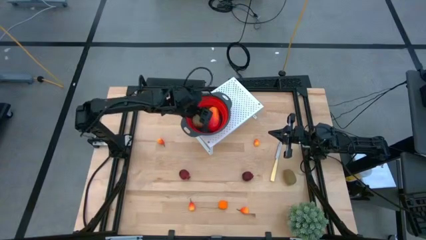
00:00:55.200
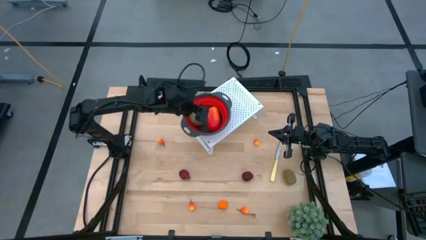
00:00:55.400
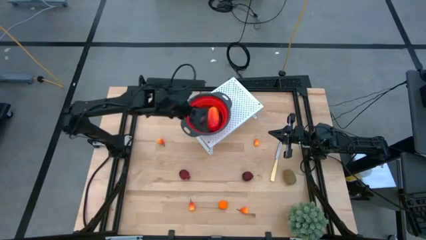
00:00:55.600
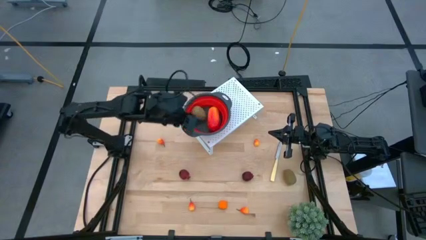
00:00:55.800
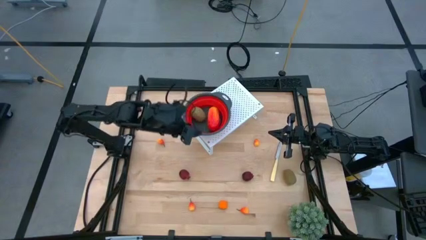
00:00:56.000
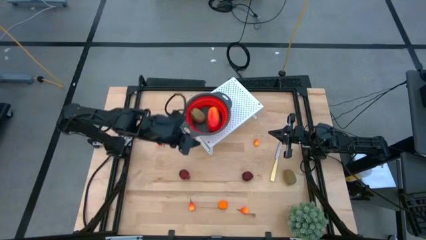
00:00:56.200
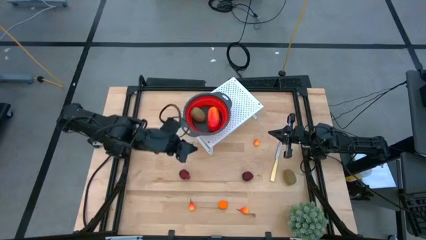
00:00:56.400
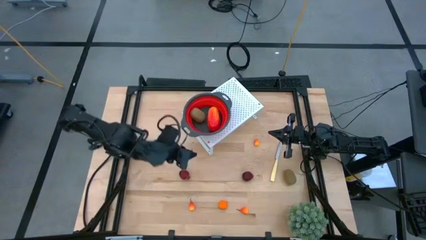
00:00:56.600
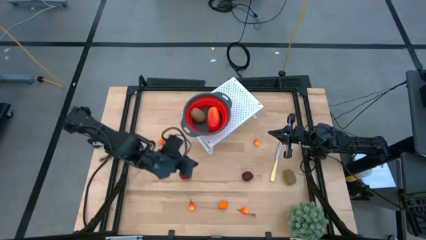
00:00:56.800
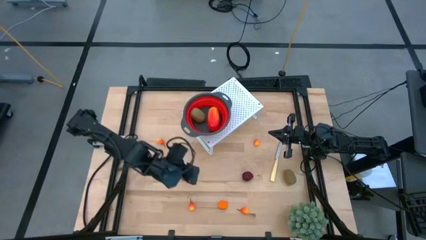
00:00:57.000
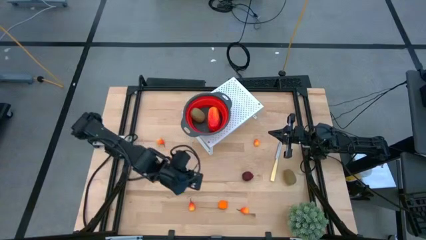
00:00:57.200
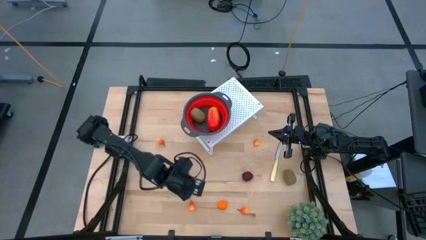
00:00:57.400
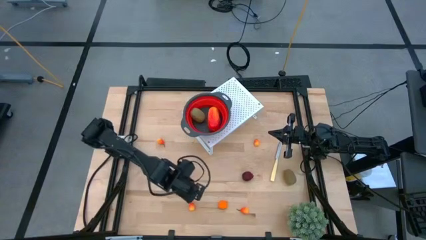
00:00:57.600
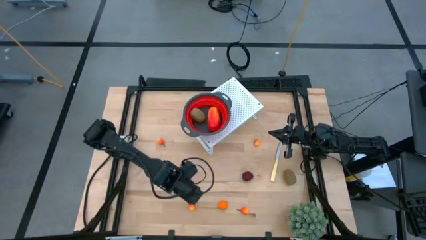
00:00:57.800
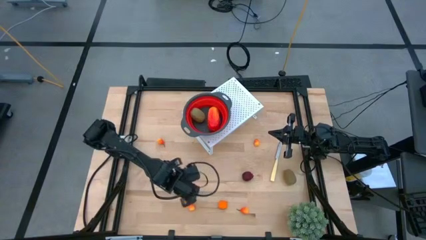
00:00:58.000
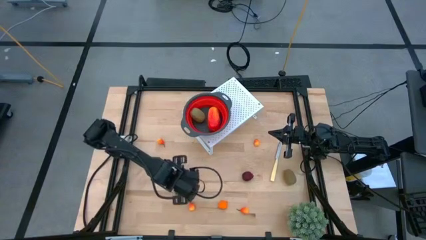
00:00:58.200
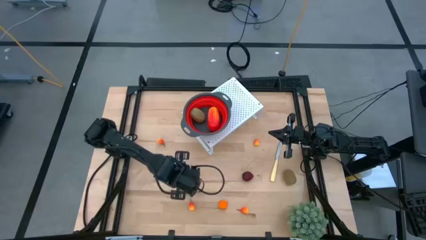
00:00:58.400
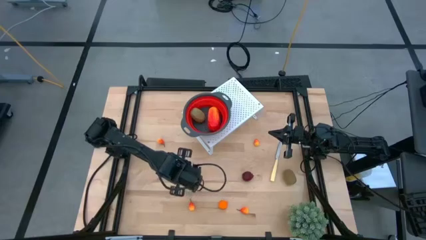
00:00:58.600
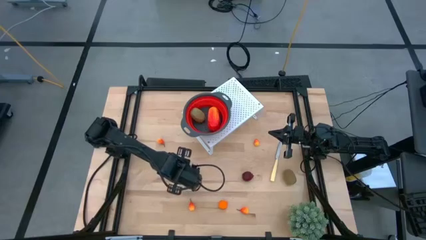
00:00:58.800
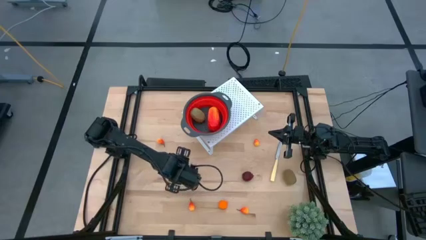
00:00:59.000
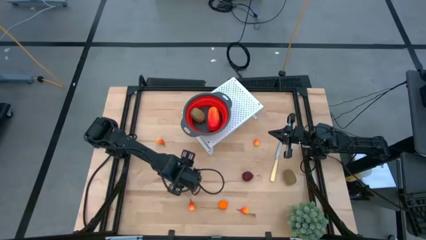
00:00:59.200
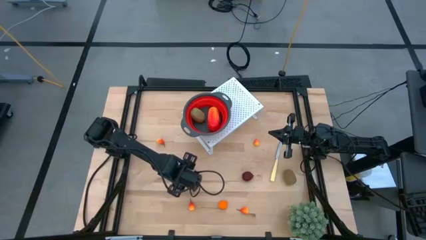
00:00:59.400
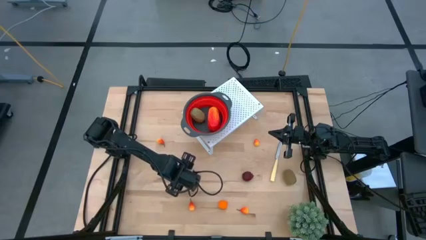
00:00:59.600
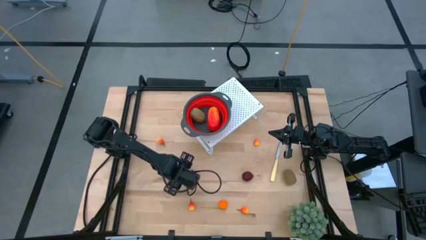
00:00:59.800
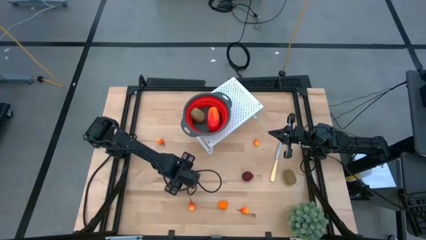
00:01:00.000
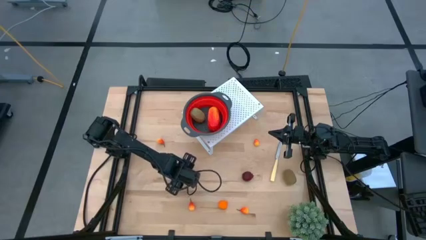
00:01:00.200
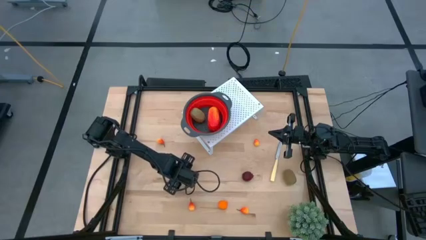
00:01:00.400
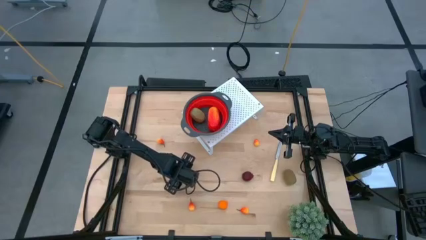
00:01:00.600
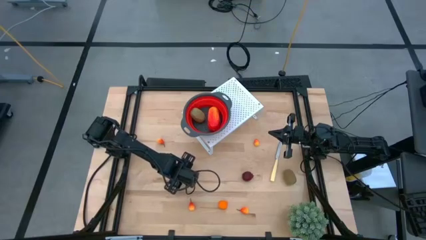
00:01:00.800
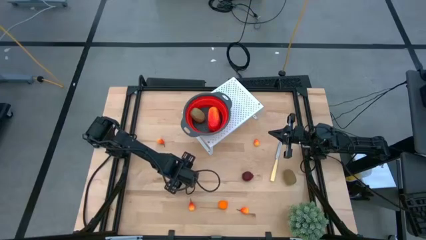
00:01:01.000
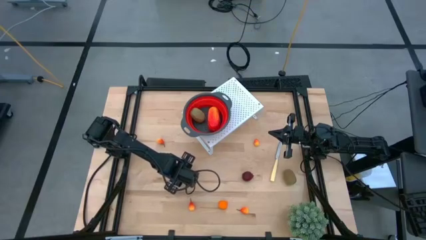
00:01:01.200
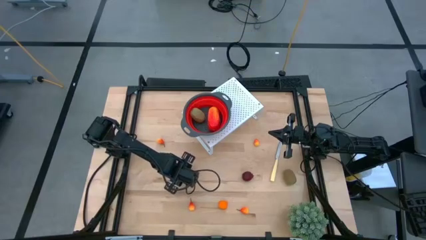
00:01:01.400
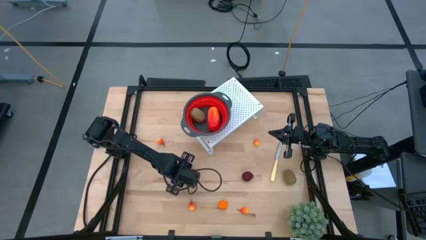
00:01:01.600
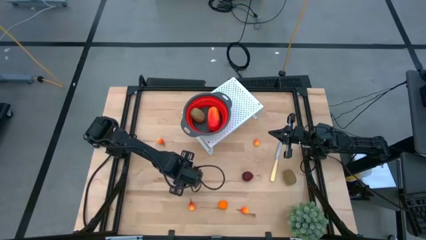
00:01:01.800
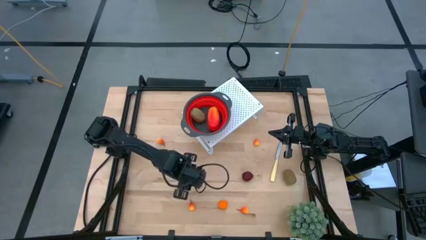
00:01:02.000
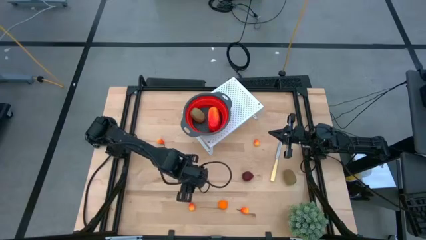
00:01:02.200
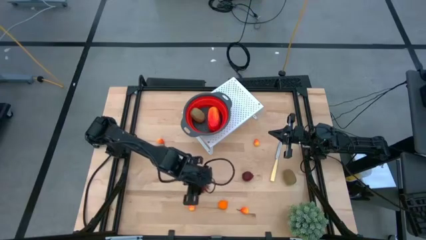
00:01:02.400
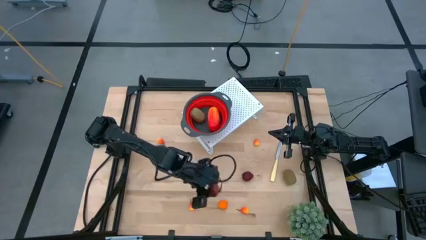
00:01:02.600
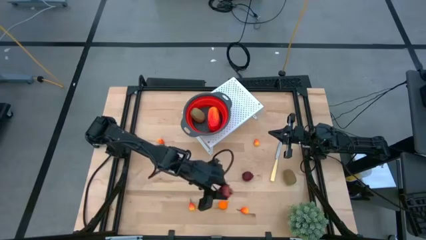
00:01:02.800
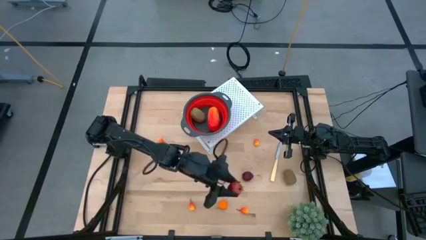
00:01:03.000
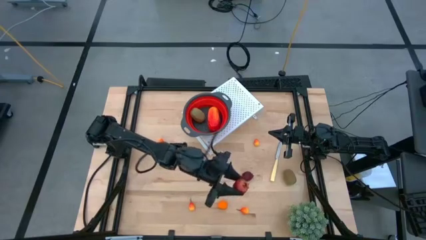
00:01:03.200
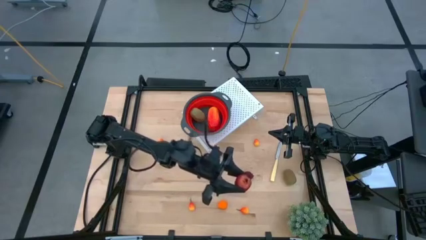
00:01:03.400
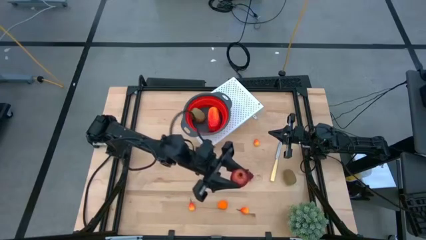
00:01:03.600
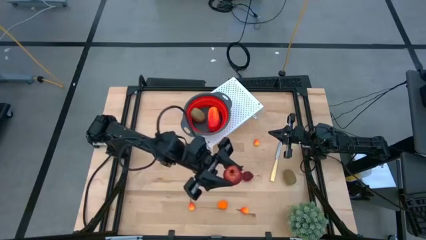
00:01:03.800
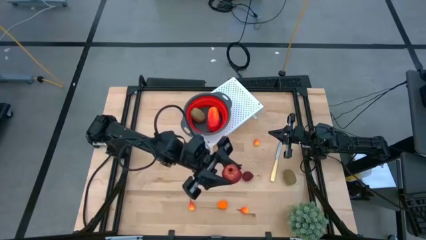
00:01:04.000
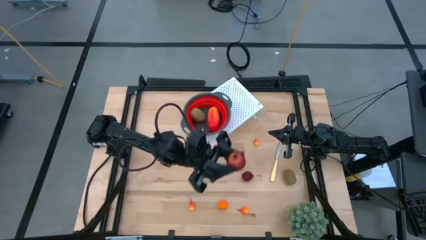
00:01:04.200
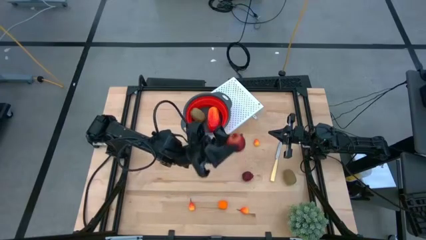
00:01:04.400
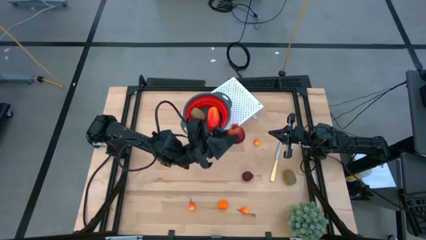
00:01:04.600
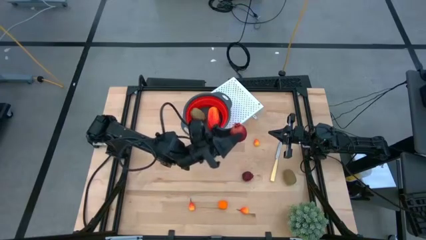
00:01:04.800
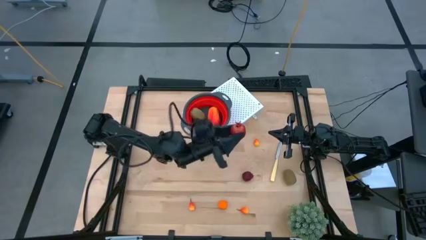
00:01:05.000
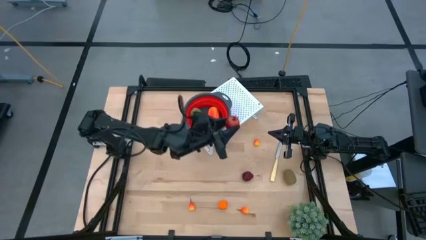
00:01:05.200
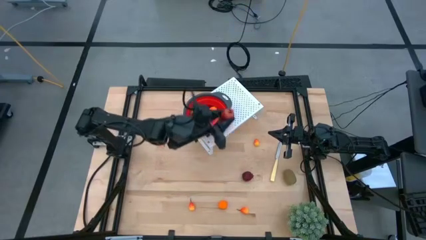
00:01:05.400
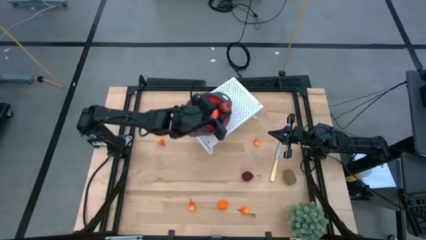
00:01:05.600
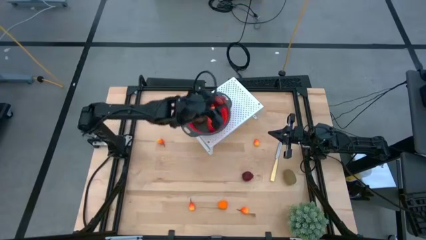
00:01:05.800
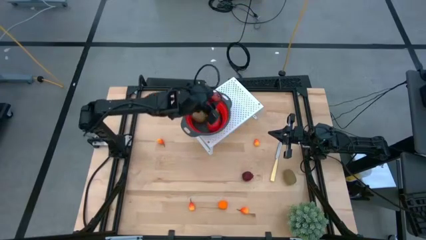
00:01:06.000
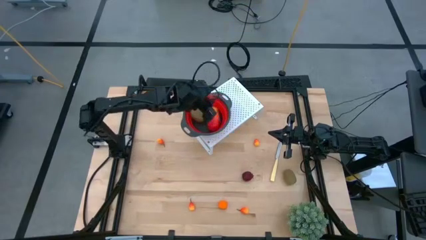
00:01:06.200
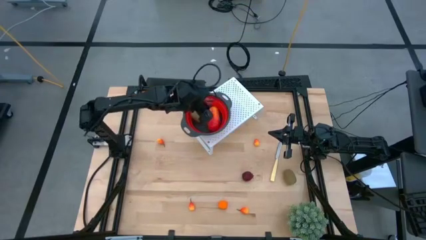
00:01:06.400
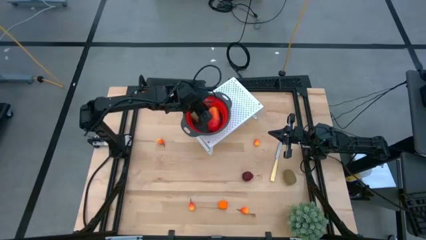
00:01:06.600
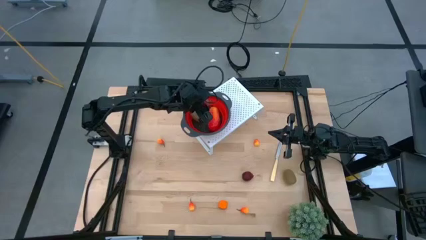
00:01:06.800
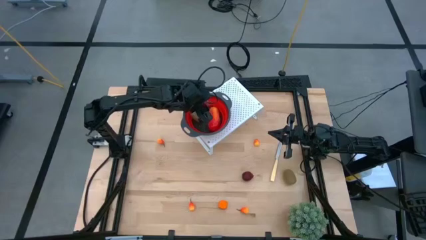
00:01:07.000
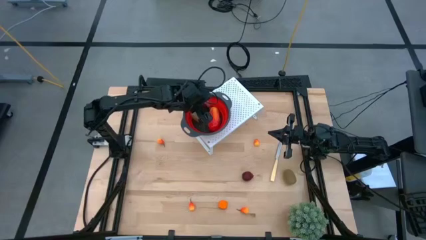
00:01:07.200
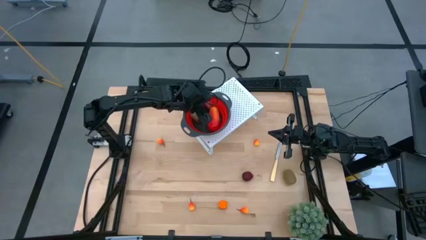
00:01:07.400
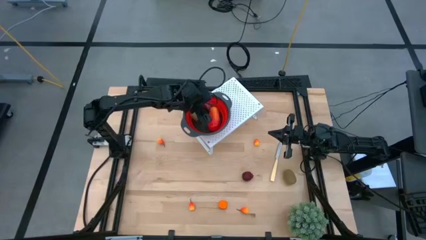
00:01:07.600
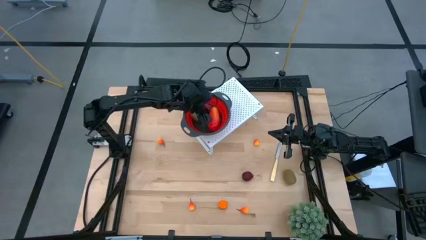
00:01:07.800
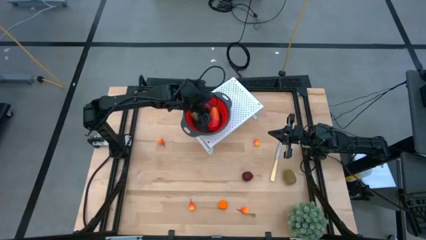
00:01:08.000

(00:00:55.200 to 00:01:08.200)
Task: Pick & Place Fruit
Put the left pomegranate into the red strainer bowl on the shelf

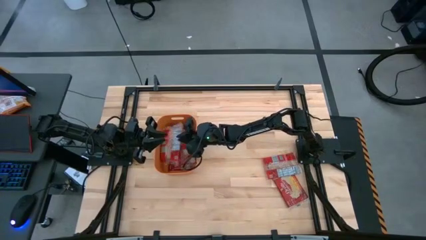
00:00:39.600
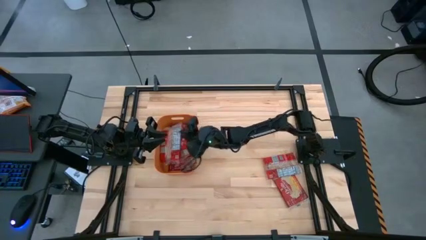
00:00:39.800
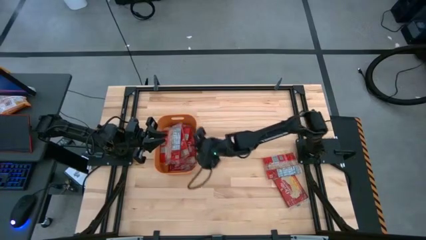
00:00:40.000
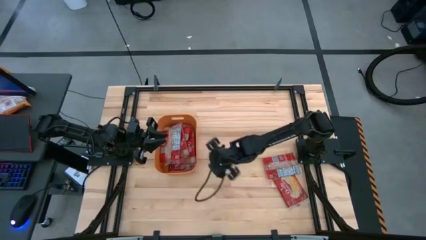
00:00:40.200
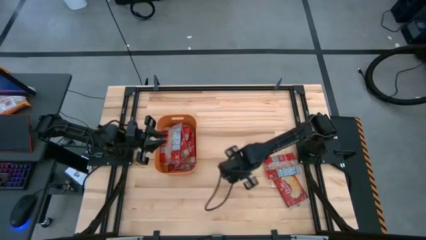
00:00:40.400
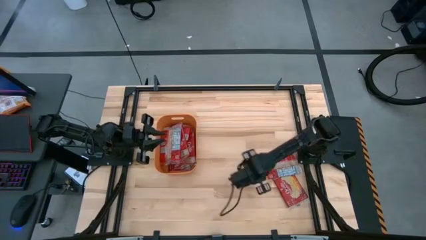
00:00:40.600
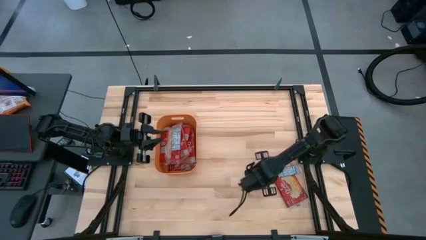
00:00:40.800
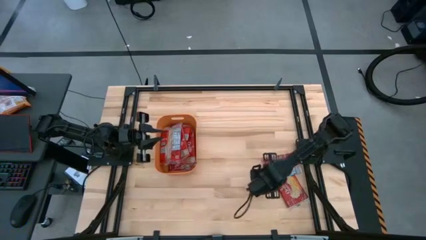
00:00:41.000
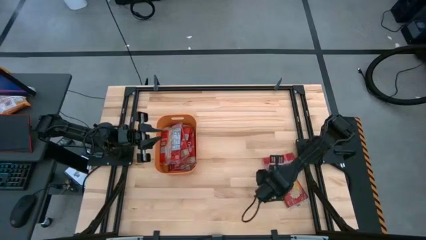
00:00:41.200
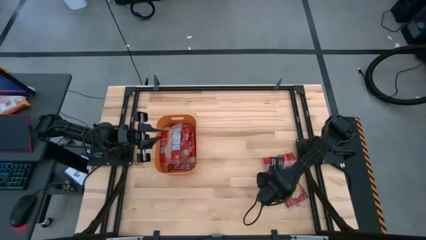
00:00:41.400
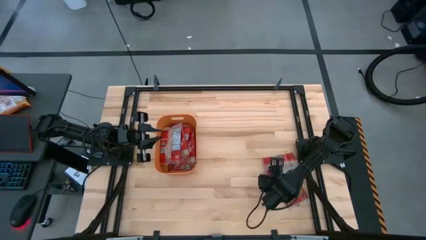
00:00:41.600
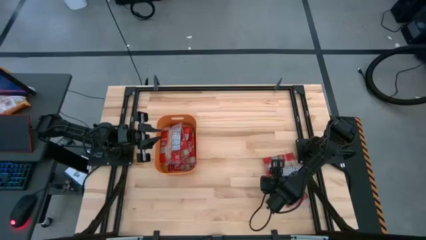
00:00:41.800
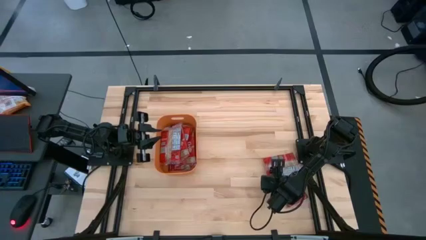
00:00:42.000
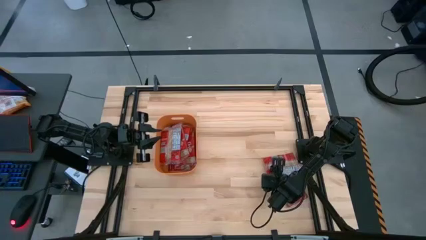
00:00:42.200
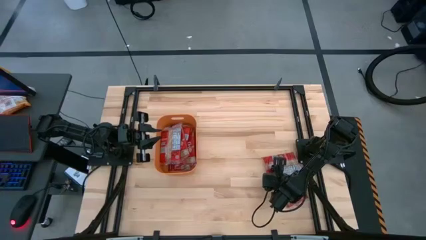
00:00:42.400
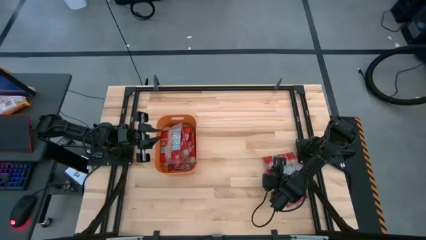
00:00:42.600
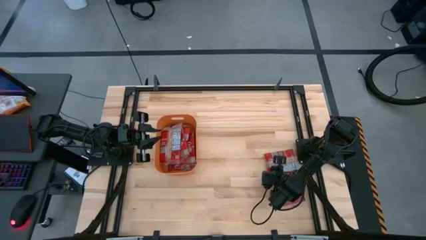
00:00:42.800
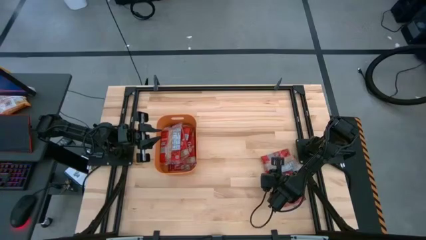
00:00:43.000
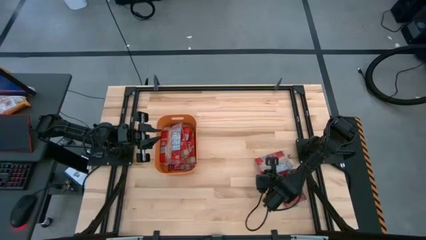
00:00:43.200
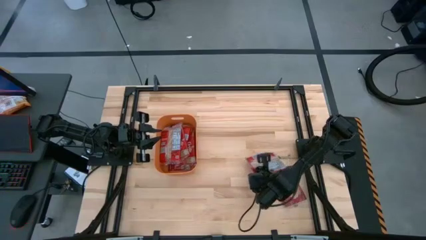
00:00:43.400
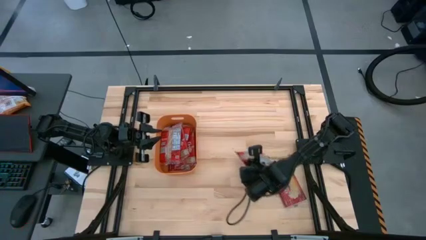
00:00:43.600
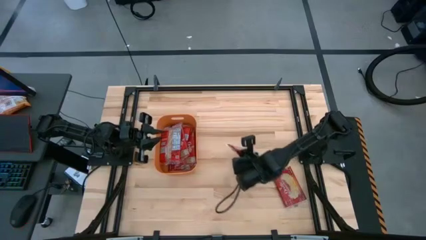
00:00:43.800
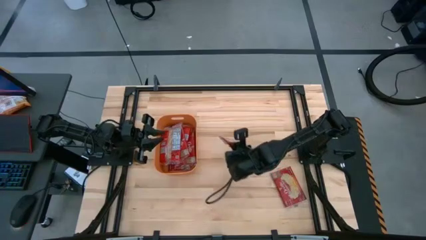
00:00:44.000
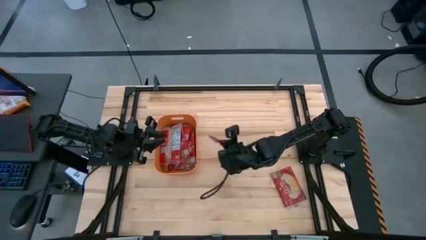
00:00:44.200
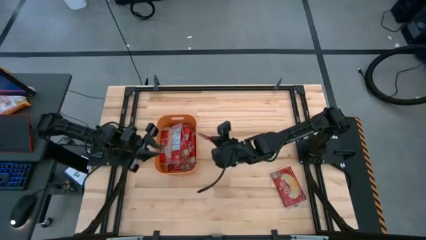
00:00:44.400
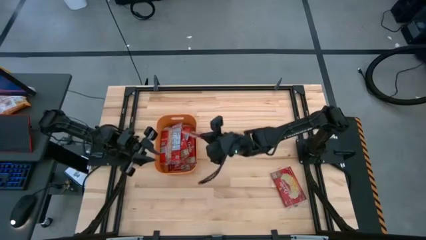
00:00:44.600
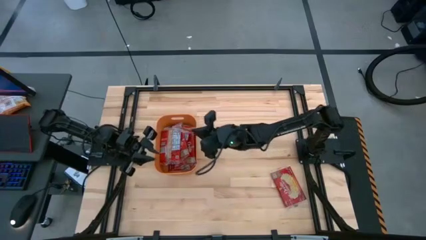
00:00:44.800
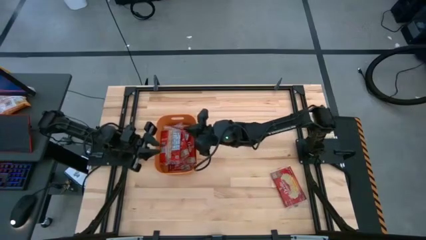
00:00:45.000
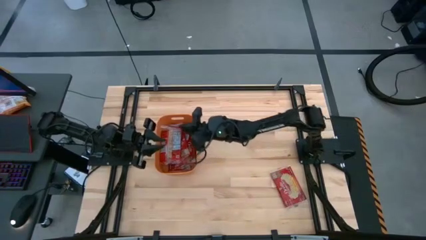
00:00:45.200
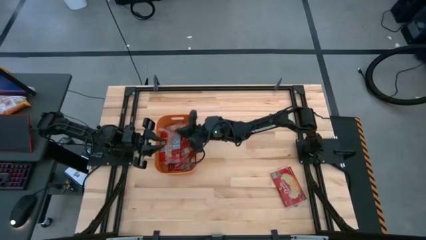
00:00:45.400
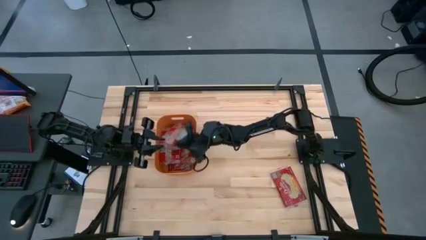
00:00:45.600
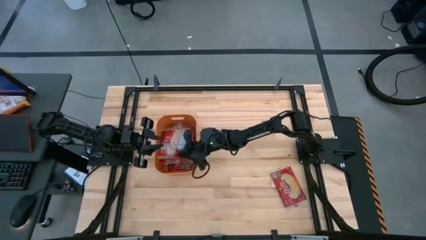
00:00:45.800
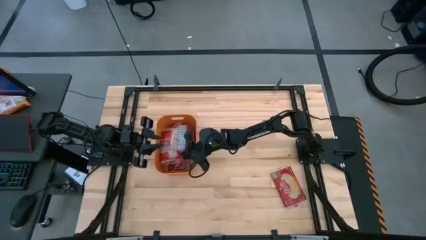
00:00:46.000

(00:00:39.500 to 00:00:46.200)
Task: Sort popcorn bags into baskets
Put the popcorn bag into the orange bin
